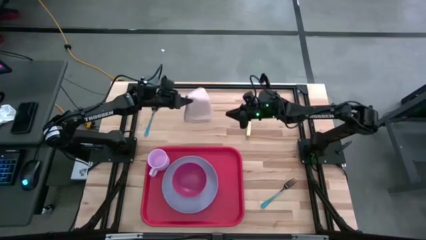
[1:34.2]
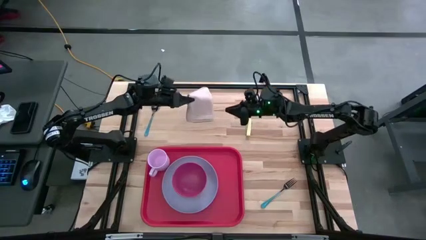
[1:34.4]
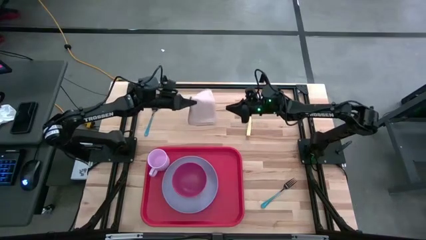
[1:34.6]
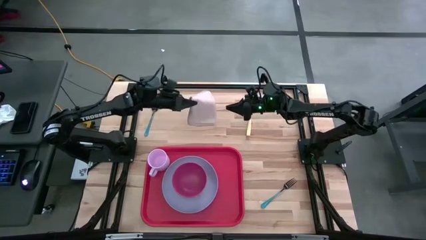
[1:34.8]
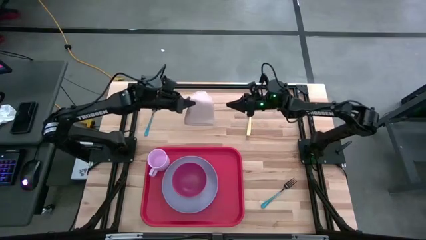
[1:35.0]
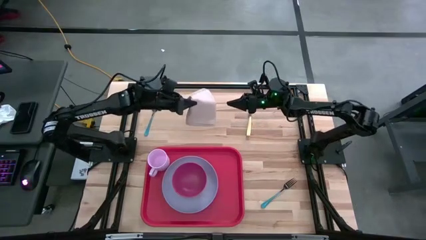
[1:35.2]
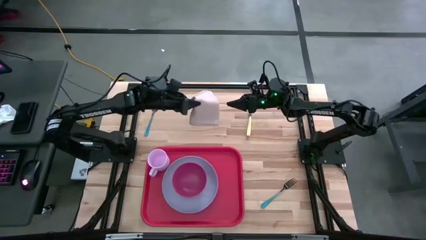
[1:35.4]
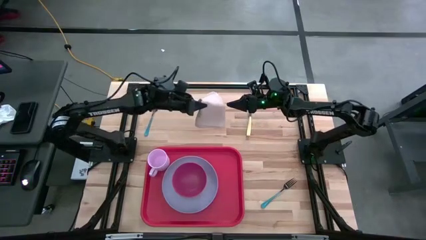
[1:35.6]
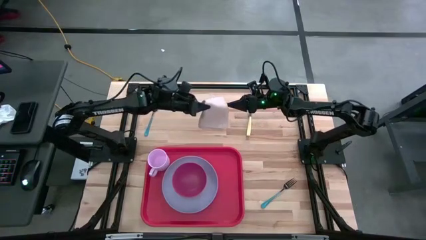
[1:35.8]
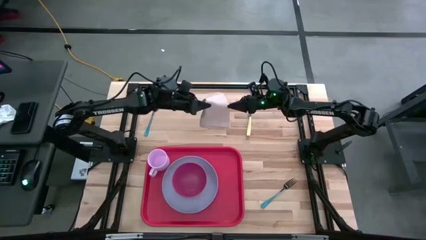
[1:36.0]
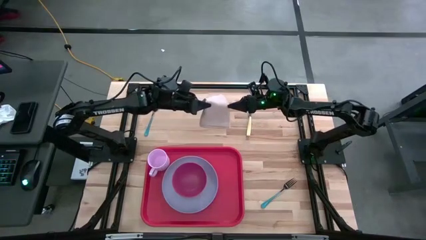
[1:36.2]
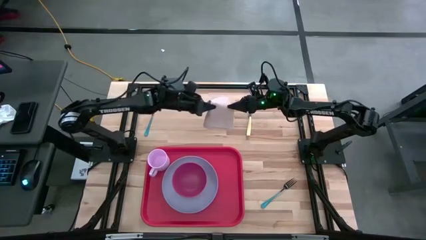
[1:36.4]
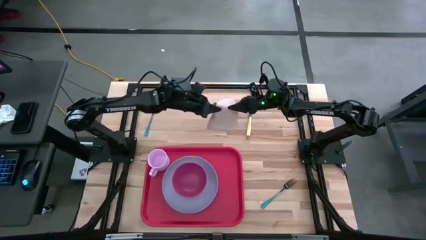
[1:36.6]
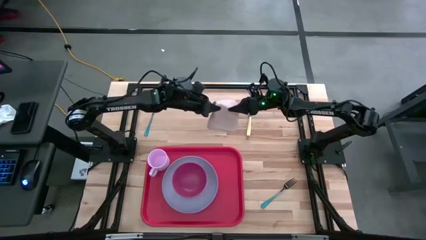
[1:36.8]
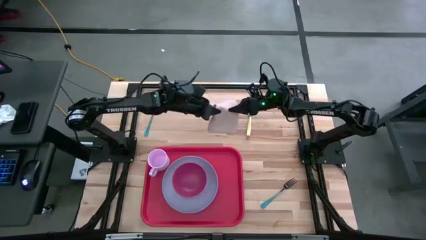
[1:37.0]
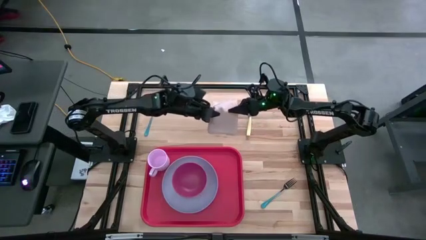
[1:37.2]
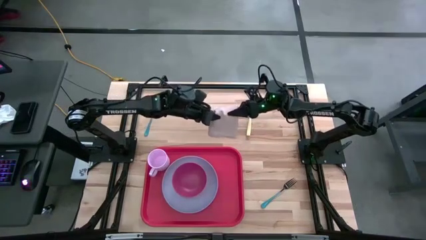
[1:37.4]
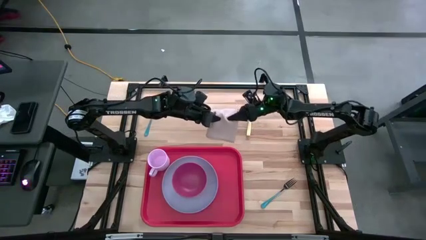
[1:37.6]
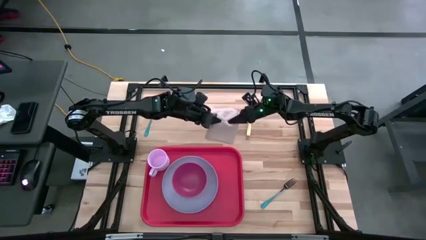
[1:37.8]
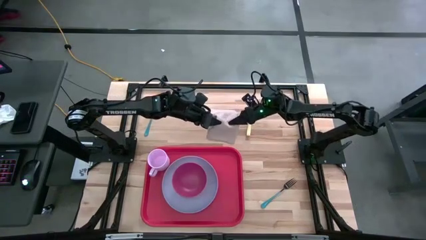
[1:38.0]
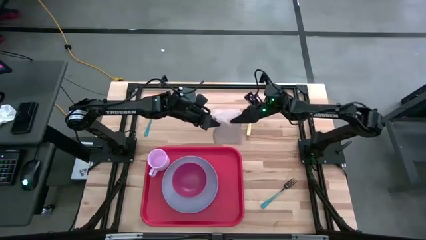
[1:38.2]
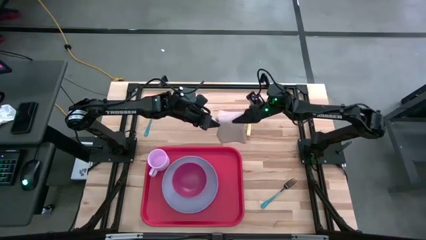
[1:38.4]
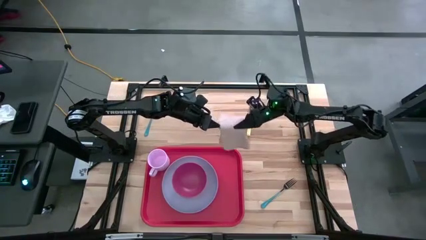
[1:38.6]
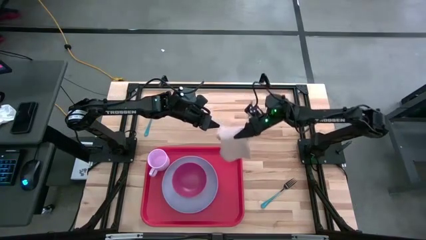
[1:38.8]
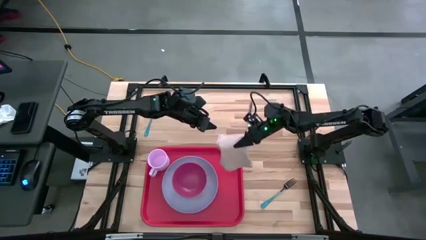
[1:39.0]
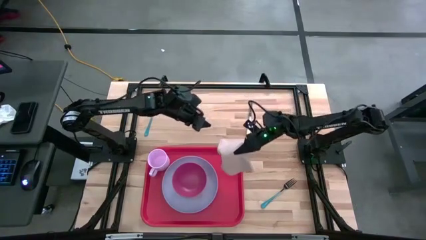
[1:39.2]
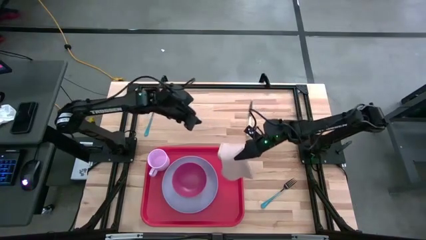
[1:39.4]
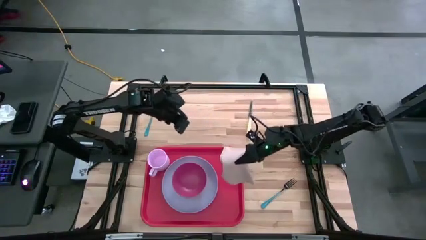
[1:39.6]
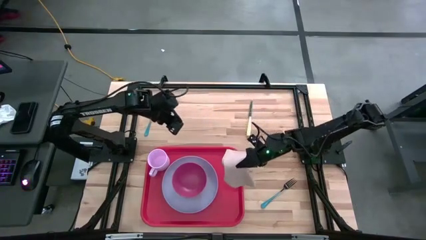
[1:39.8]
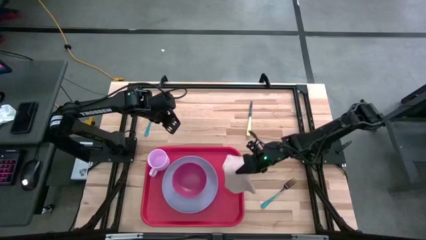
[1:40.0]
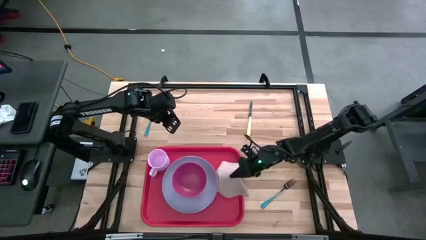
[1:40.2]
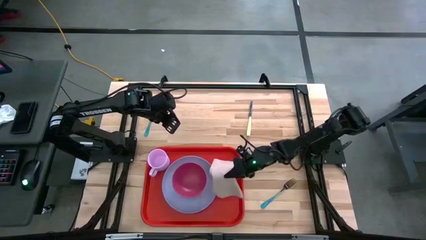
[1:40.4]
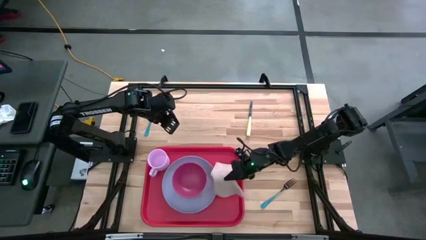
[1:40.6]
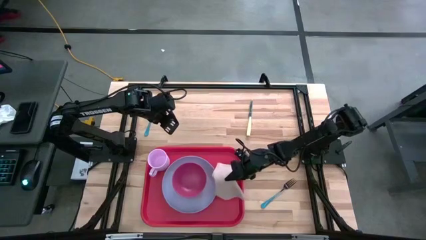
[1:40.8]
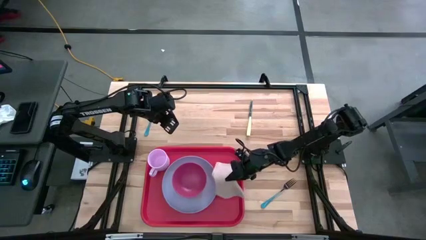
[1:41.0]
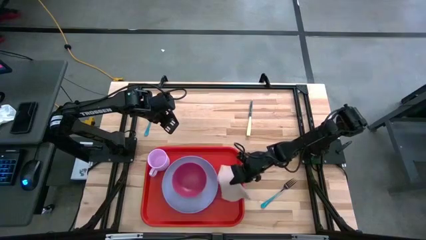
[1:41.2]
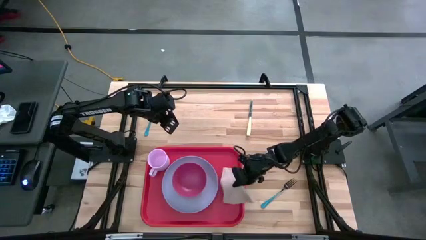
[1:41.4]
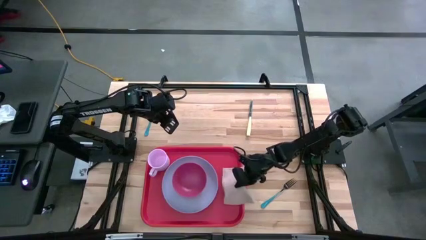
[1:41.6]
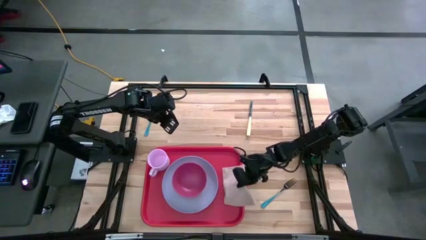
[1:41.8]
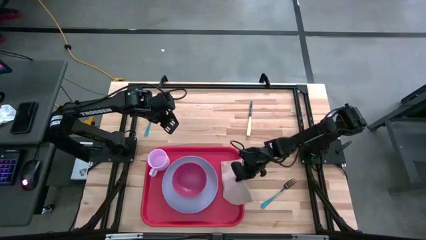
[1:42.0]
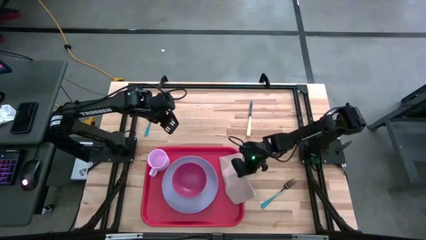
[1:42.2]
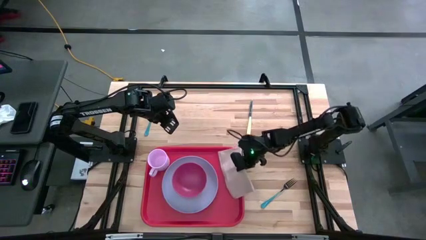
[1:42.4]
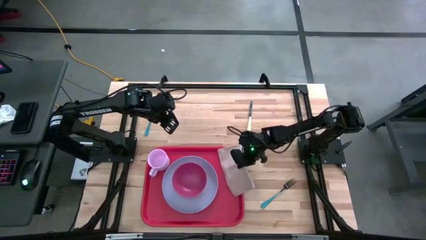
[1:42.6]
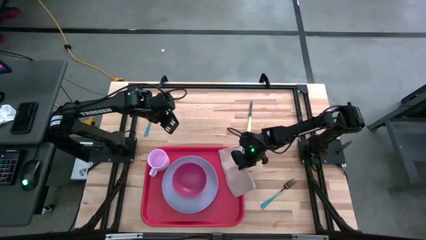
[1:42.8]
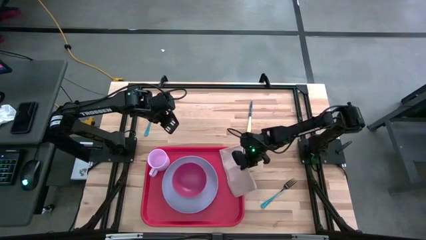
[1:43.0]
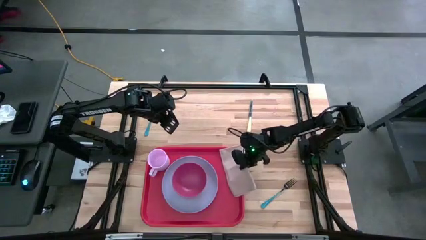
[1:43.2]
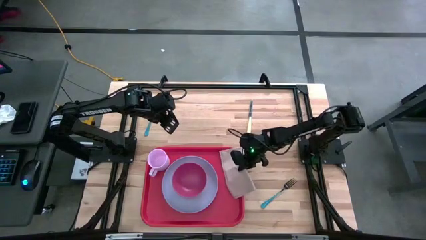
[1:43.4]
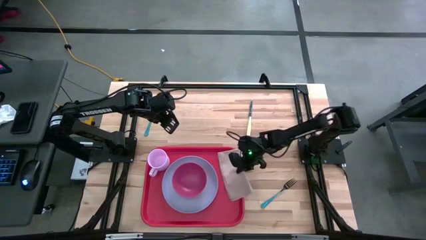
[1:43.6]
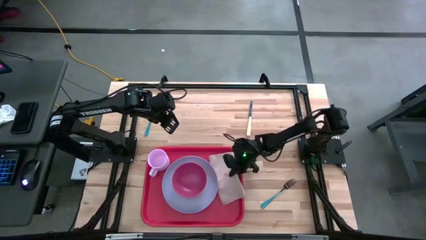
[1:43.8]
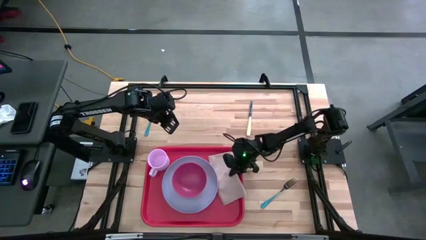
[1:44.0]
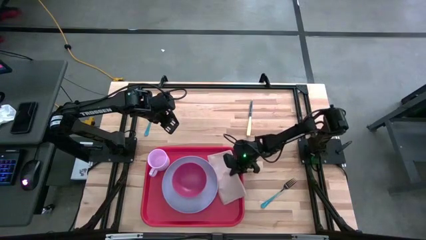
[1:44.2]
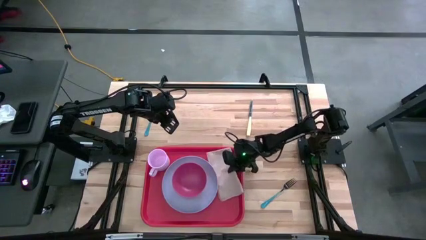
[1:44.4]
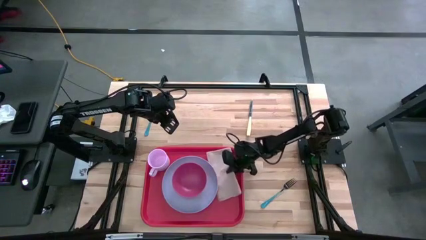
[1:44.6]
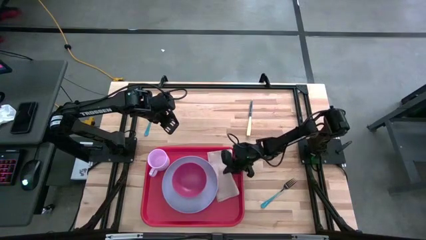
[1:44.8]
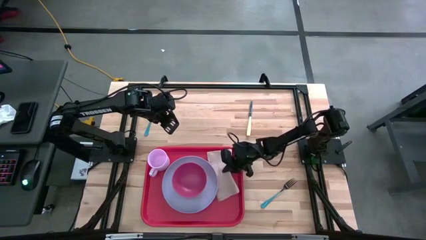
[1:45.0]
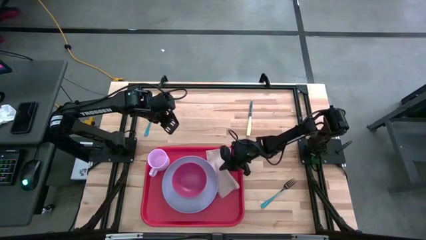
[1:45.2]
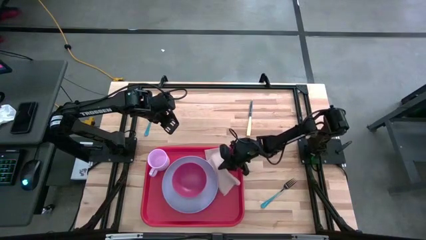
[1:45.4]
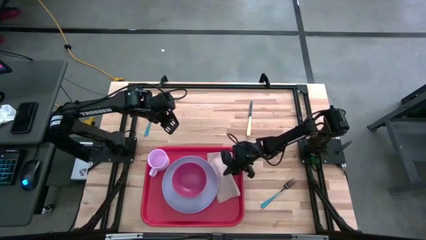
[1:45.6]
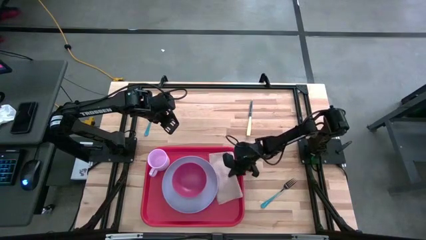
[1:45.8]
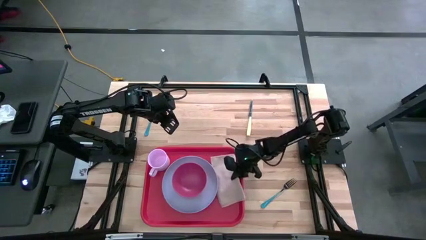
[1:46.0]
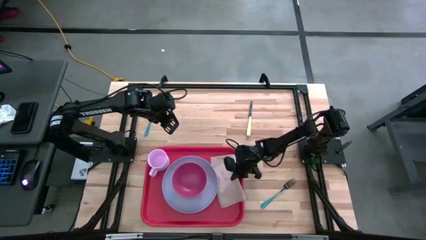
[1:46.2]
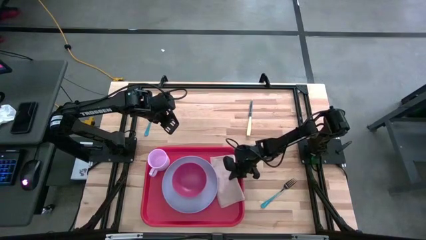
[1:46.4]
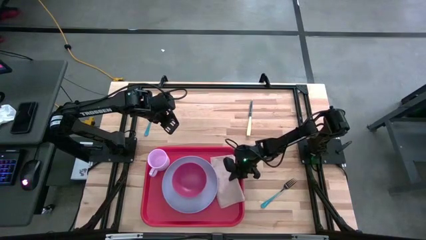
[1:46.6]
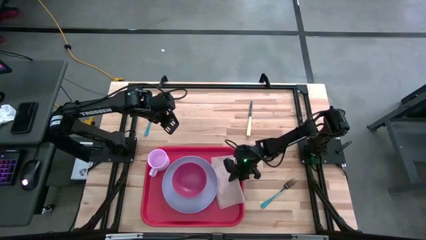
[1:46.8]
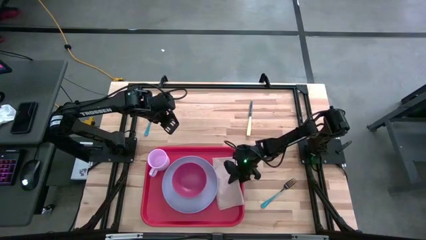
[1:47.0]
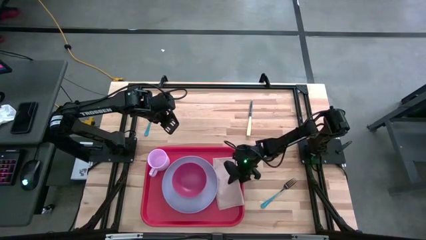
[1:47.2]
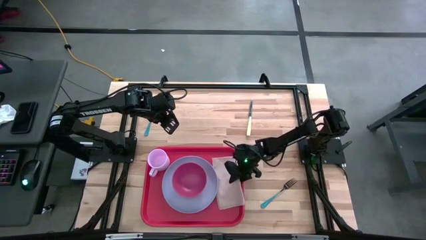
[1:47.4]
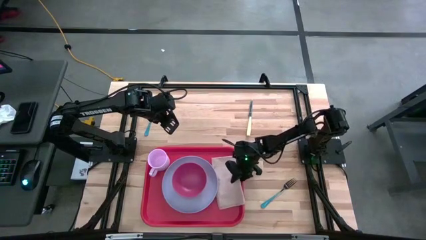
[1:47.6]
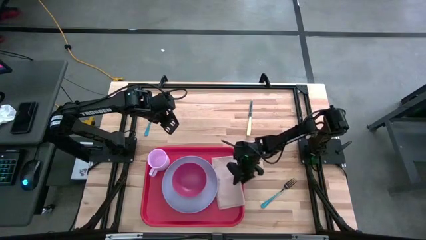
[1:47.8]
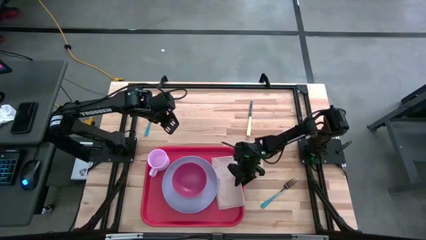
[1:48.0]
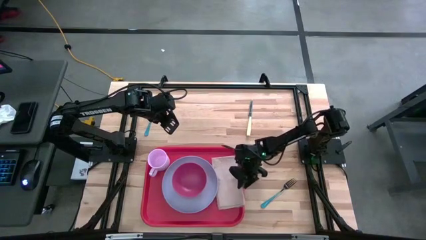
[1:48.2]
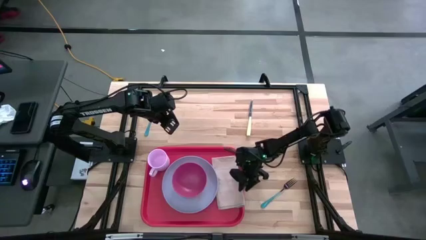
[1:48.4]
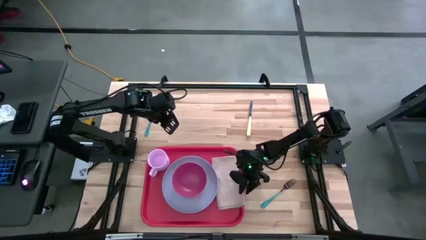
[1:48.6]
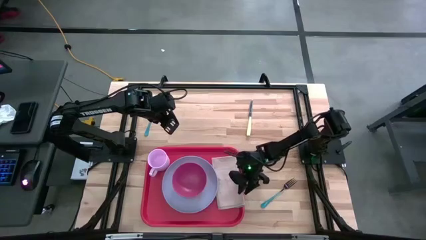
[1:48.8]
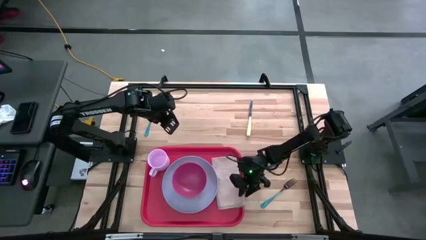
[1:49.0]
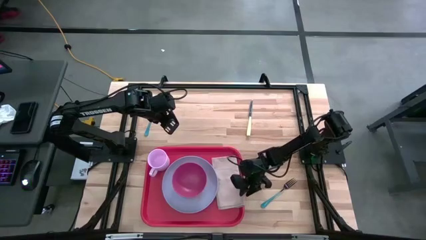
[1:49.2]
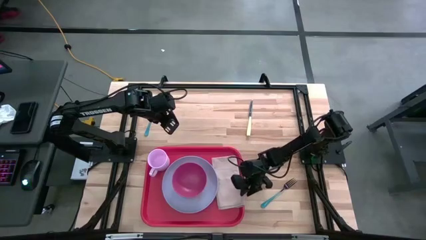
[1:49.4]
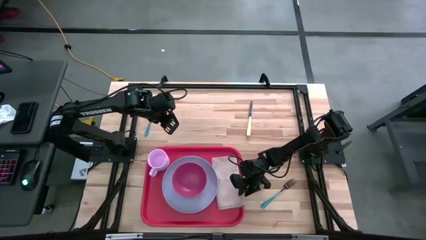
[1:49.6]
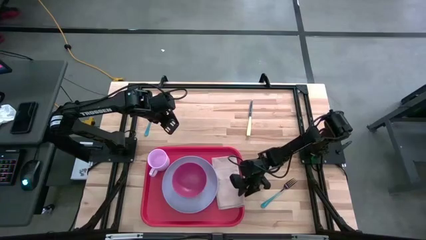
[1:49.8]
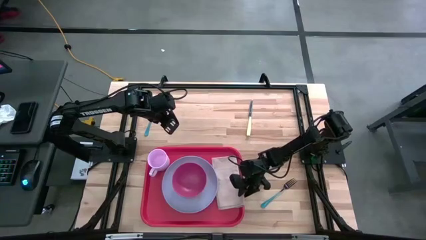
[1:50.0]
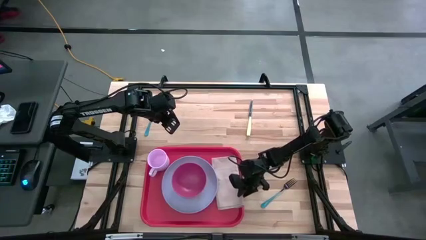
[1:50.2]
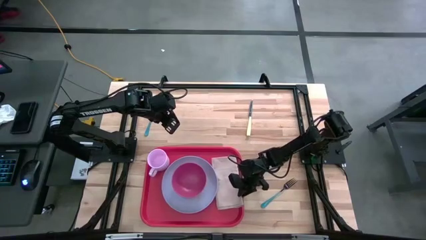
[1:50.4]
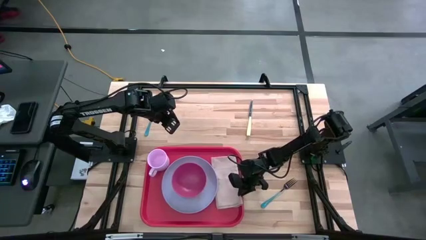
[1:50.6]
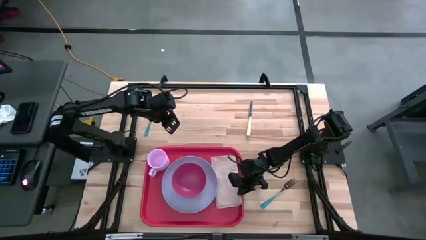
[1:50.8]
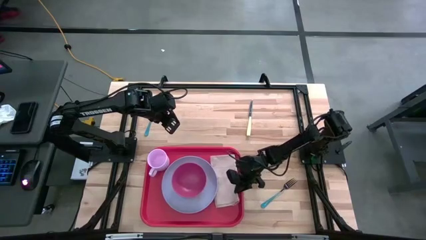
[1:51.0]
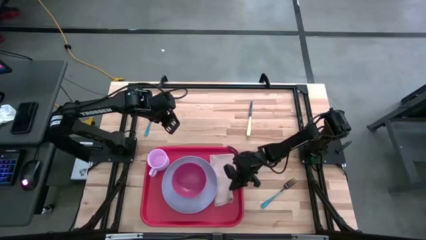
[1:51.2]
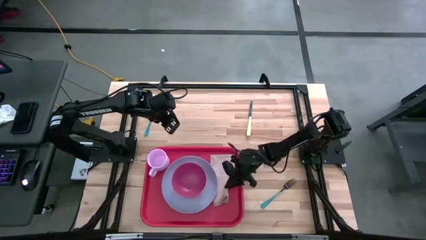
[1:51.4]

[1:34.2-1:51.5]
Task: Set up tray
Put the peach napkin to the right of the purple plate on the orange serving tray
